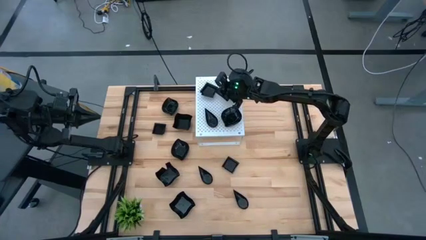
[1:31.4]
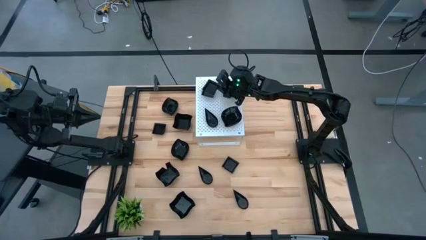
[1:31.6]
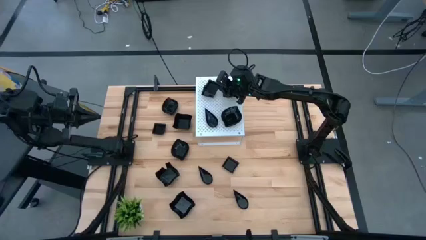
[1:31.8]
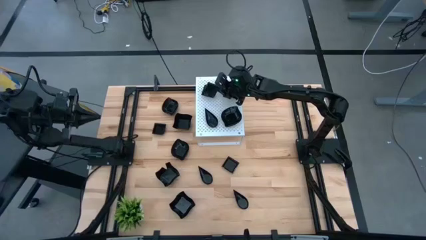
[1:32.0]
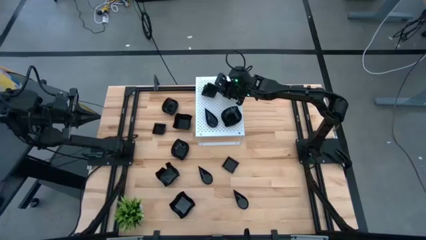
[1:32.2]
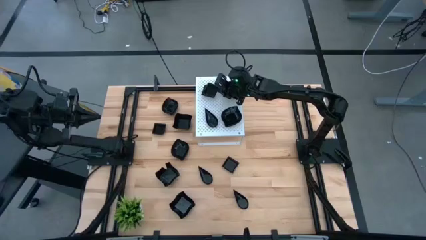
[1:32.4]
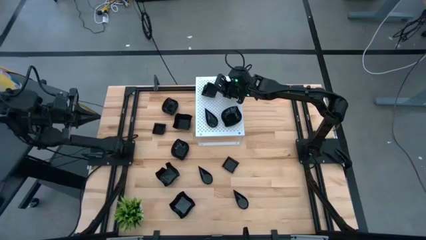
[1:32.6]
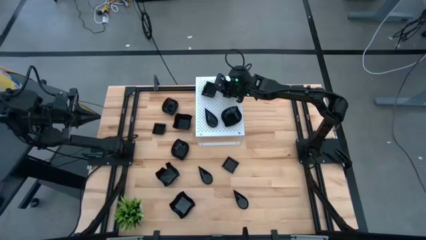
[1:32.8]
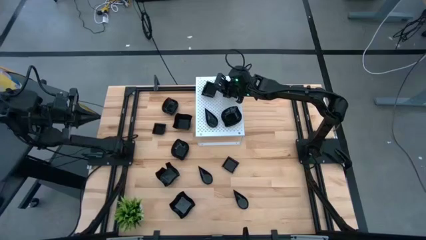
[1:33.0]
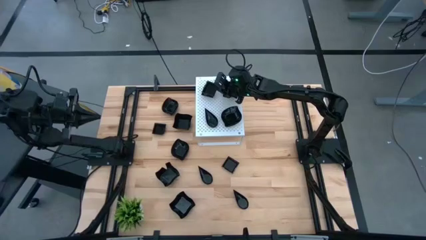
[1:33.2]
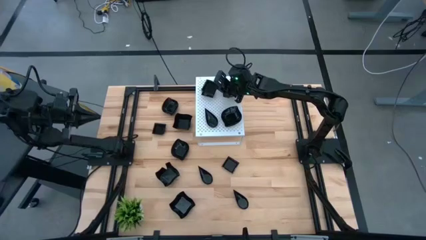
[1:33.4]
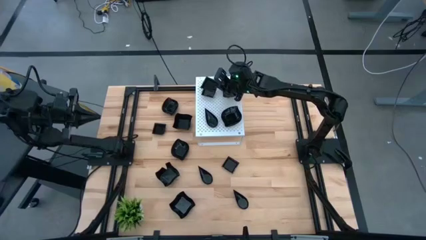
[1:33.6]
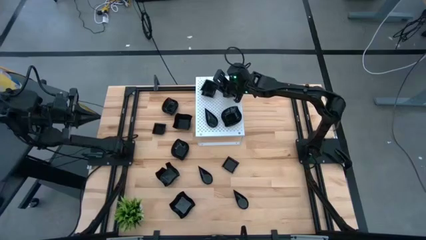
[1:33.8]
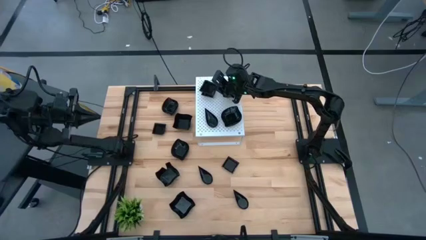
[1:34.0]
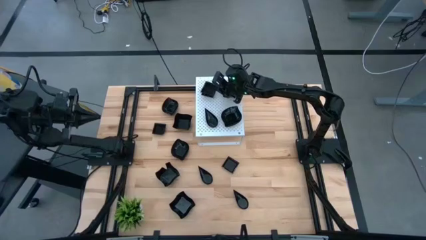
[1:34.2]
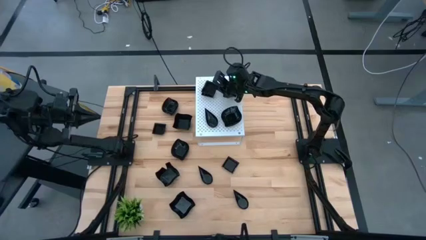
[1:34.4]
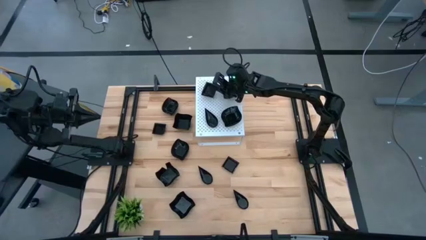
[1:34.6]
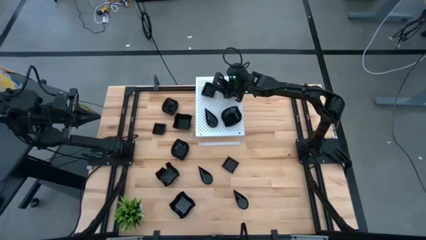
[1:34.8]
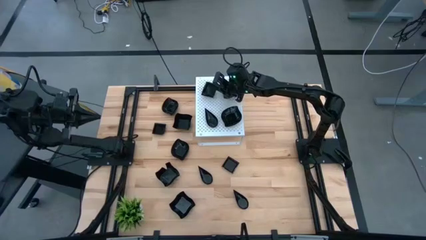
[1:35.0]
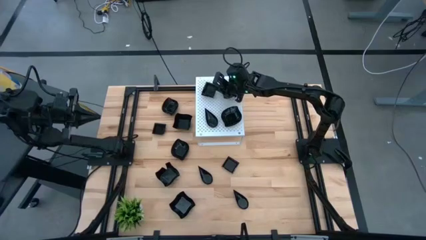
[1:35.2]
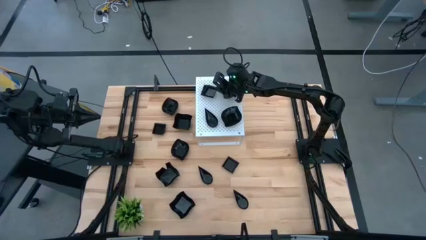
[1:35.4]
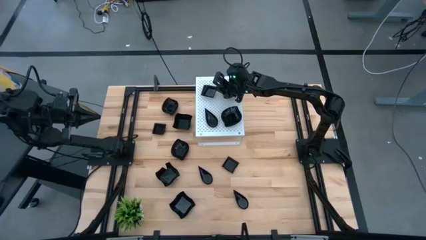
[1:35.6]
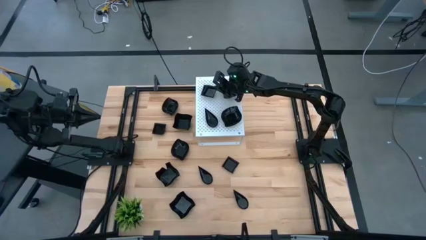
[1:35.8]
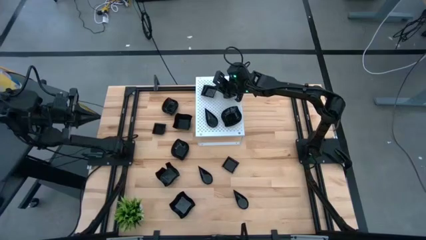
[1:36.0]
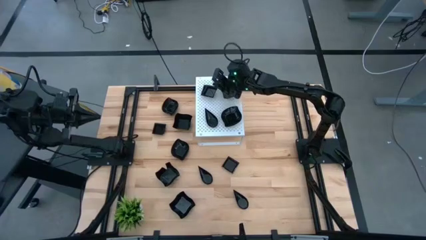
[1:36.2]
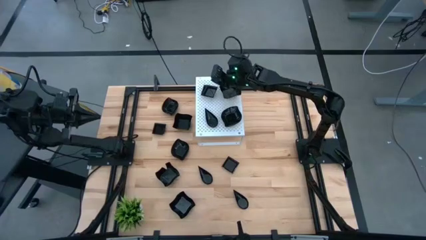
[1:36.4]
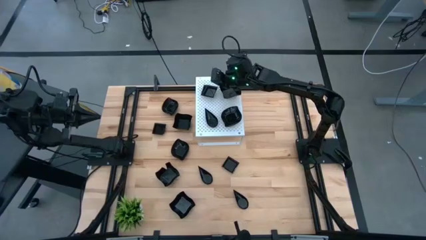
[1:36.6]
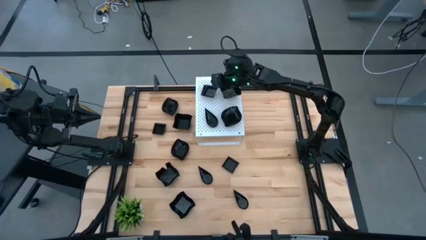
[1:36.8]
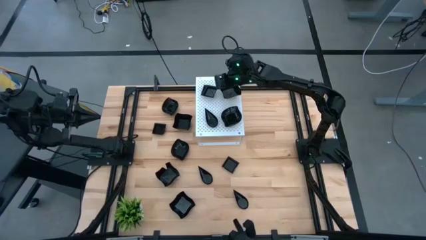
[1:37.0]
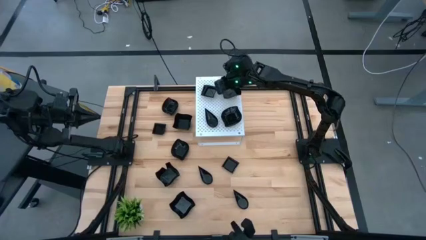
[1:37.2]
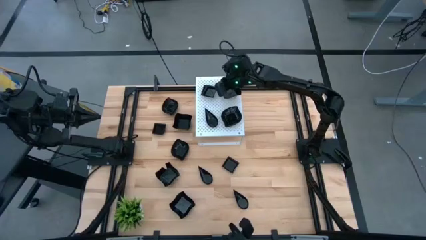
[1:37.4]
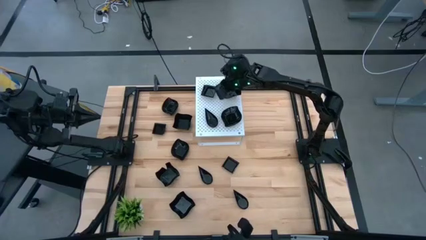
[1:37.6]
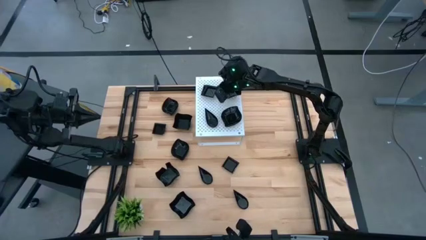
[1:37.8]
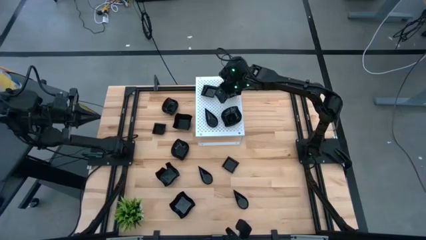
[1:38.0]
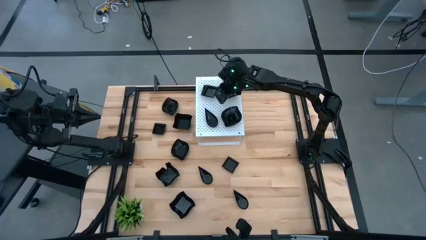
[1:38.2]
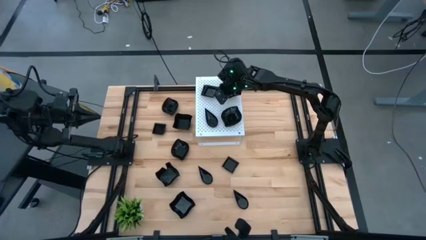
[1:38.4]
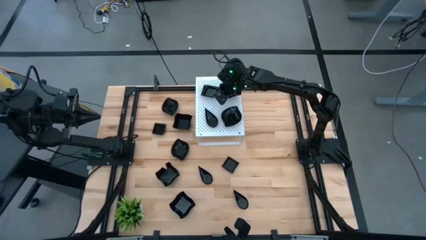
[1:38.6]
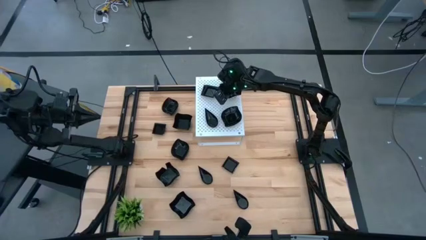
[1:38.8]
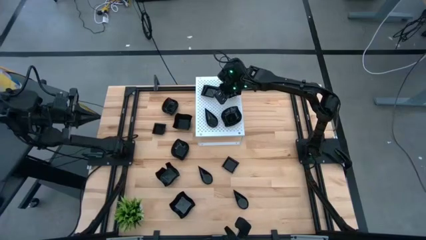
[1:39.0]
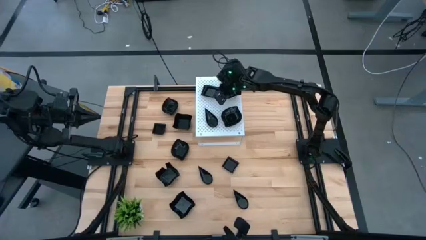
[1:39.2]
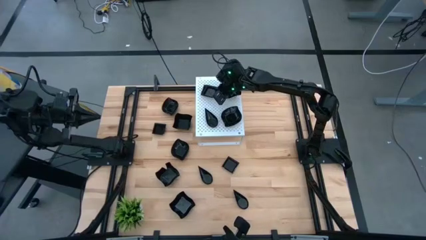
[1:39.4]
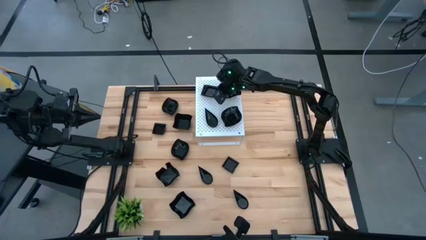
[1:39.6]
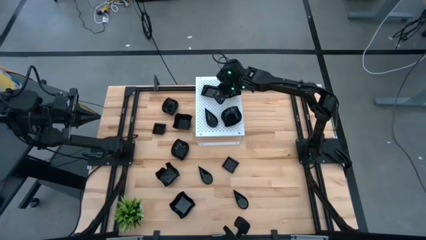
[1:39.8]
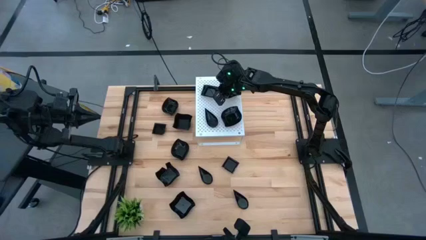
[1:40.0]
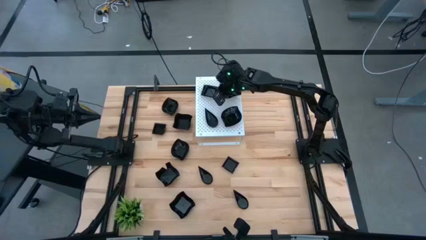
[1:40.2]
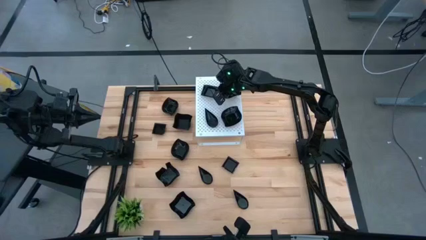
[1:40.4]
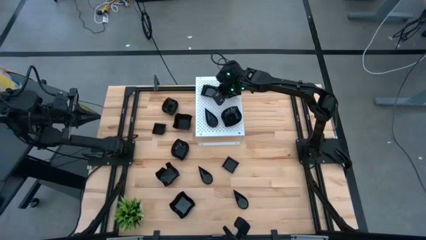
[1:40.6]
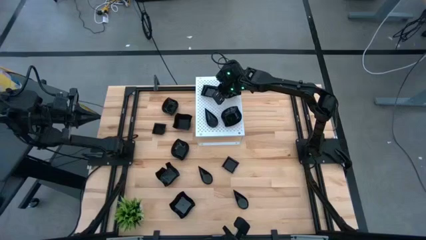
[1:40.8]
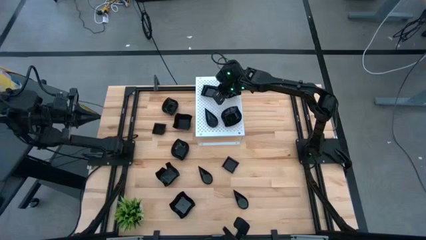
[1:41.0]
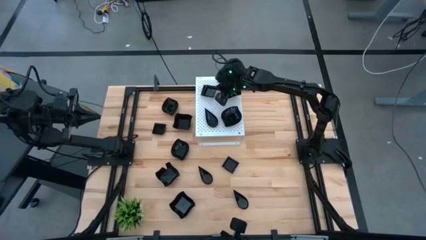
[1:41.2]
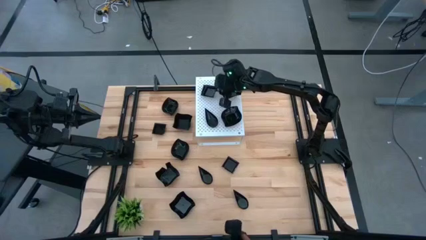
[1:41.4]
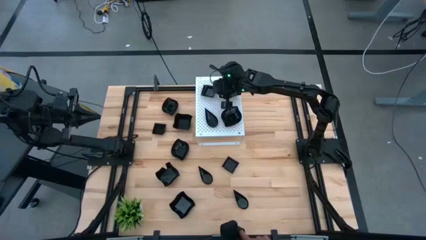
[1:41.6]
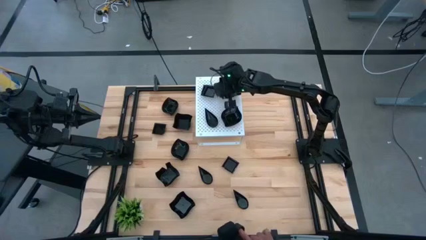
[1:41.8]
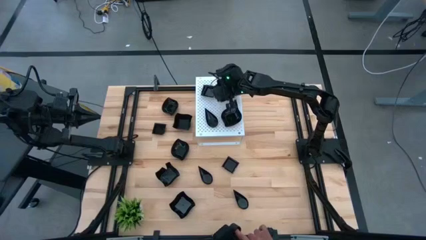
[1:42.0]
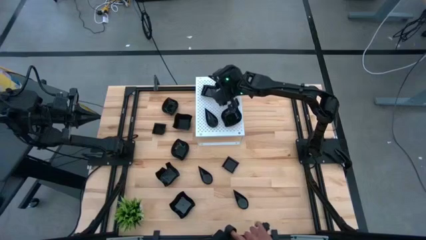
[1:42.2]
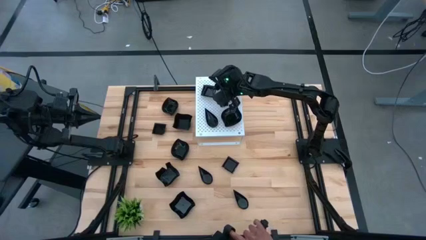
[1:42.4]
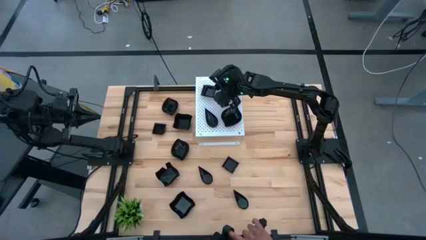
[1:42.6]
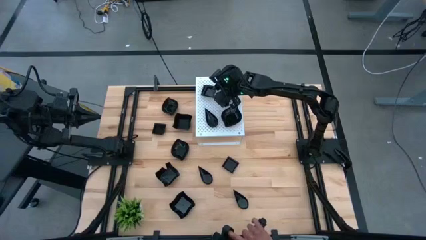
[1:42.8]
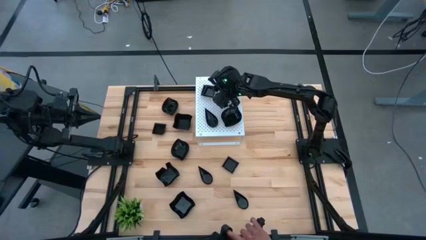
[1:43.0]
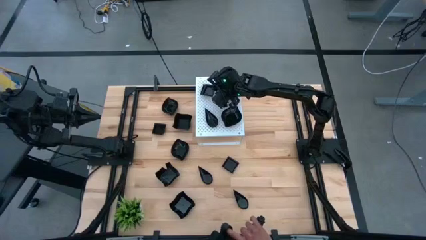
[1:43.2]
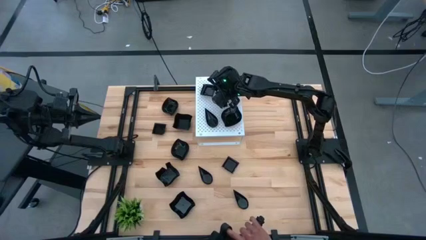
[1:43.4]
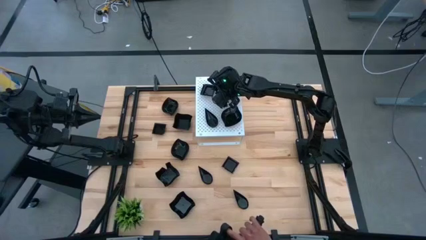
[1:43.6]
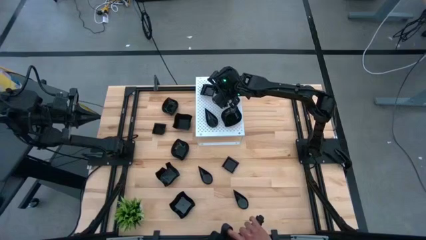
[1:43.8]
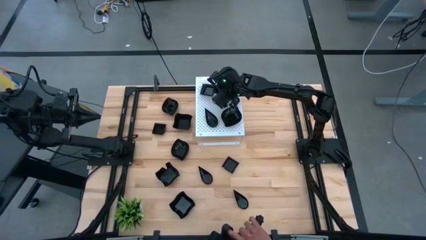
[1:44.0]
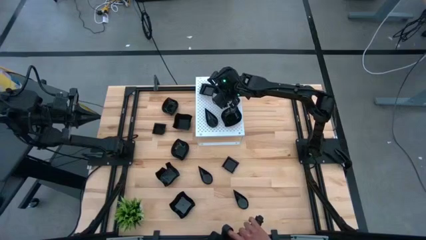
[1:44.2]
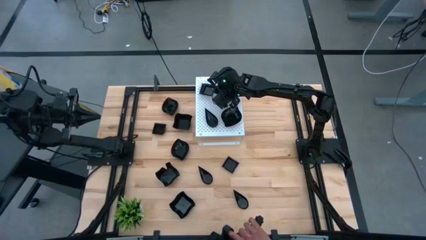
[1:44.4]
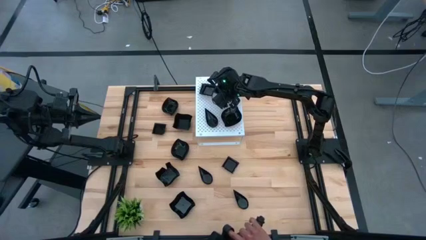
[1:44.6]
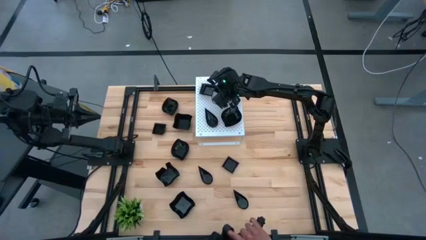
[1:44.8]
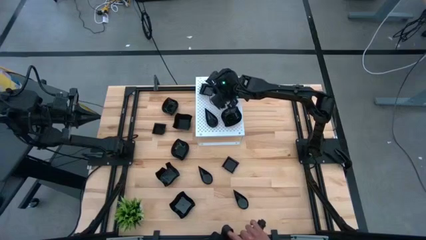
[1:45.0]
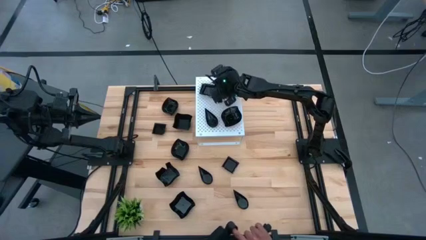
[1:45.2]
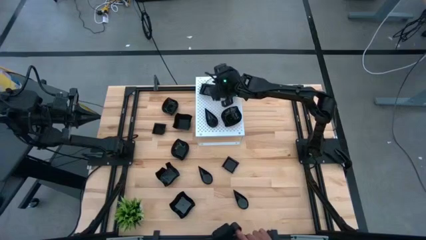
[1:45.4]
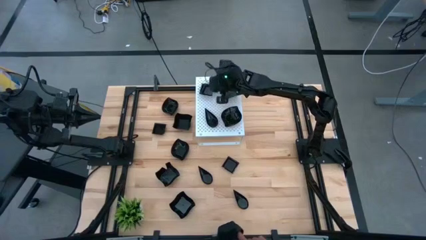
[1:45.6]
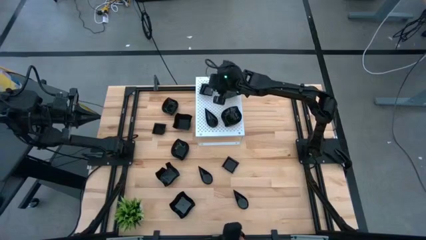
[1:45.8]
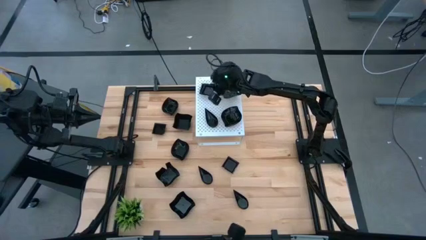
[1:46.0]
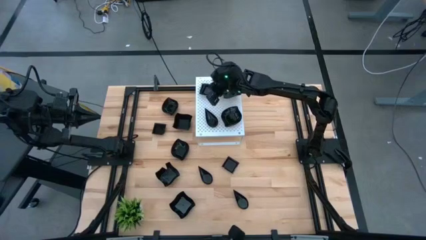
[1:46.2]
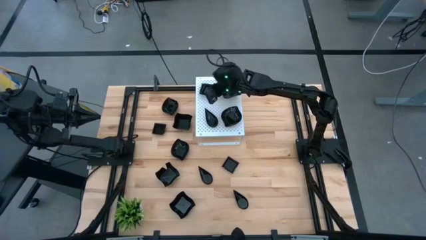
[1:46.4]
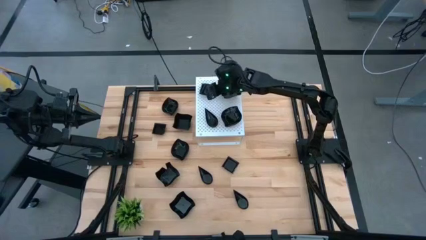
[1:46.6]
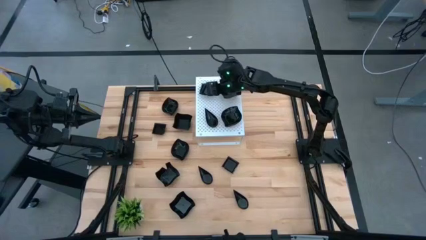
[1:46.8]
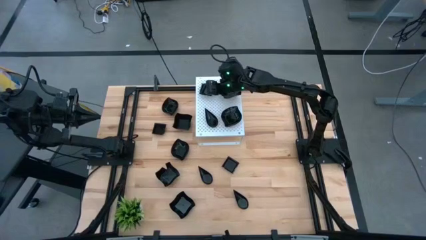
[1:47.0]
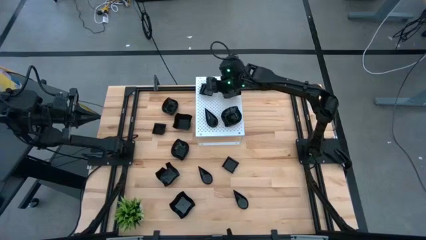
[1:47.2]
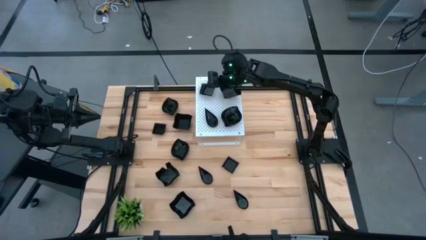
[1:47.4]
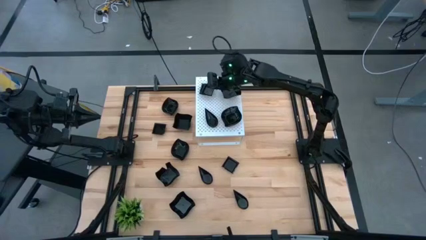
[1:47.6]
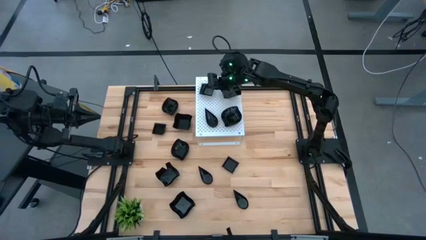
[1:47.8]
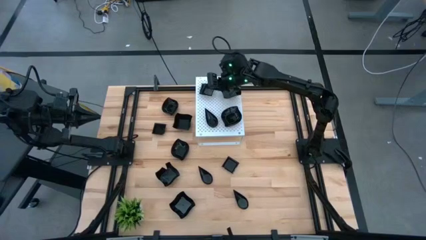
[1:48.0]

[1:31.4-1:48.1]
Task: Pick & Place Mini shaped plates
Stack the square plate on top of the square plate on the shelf
